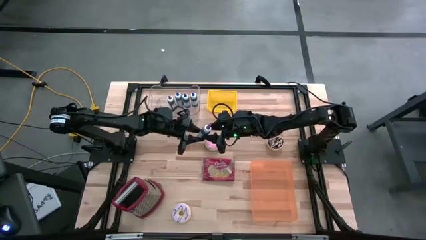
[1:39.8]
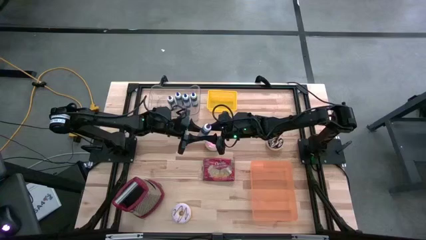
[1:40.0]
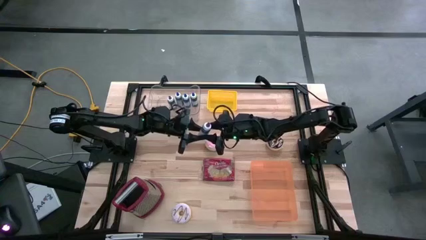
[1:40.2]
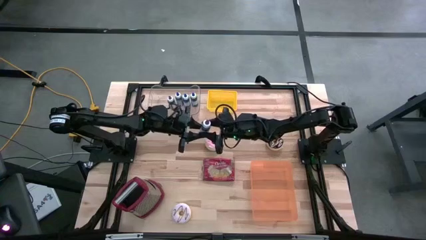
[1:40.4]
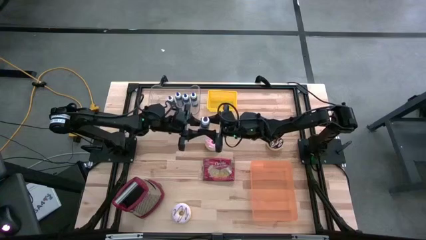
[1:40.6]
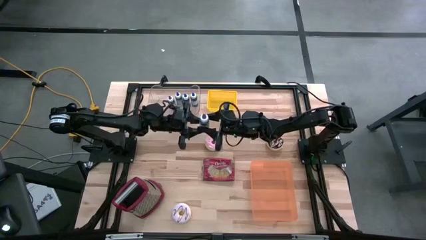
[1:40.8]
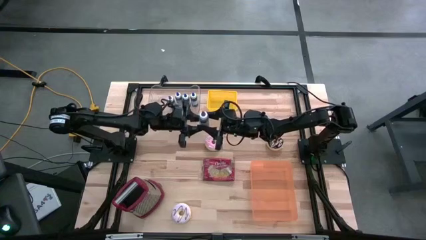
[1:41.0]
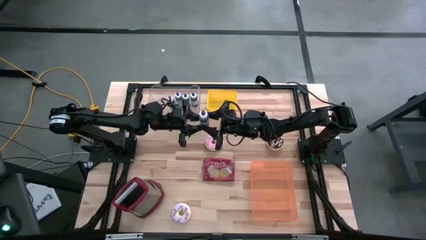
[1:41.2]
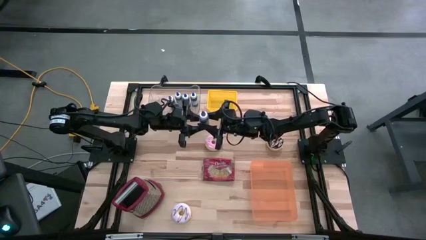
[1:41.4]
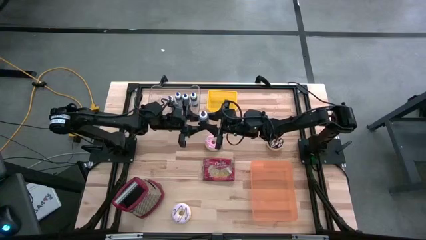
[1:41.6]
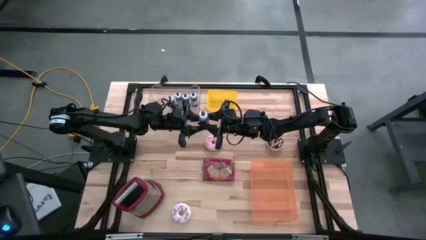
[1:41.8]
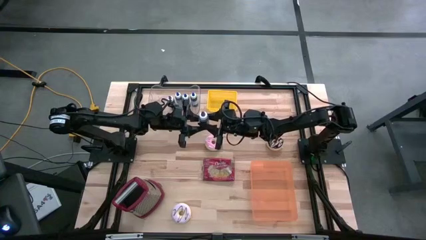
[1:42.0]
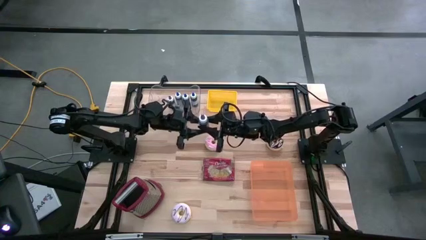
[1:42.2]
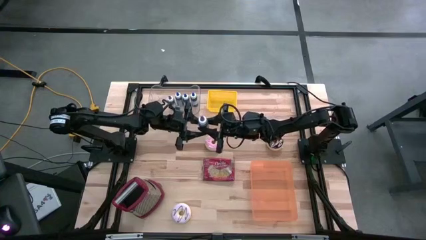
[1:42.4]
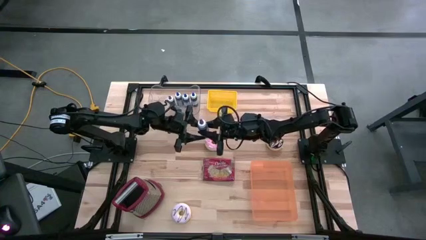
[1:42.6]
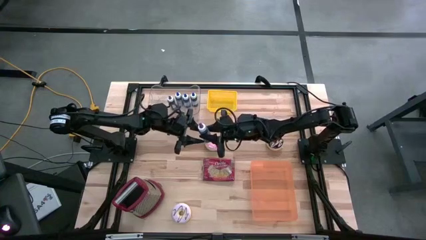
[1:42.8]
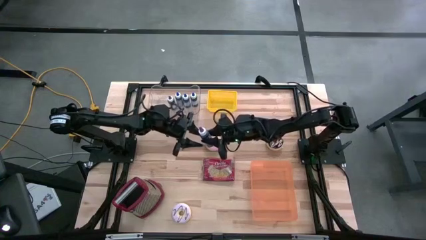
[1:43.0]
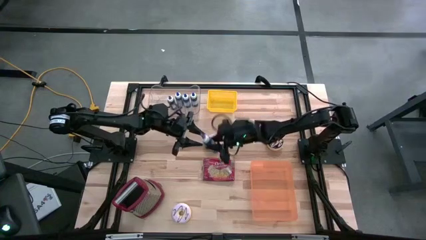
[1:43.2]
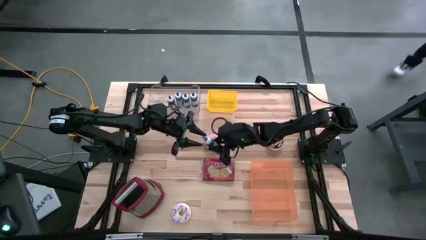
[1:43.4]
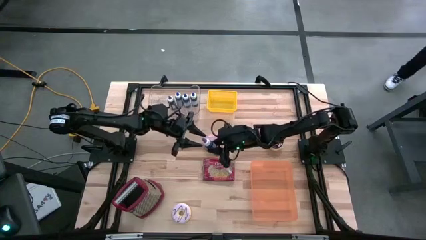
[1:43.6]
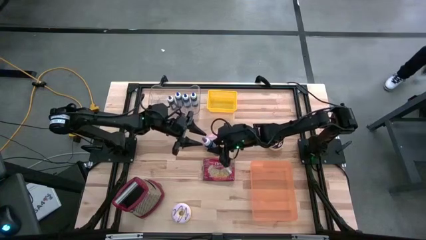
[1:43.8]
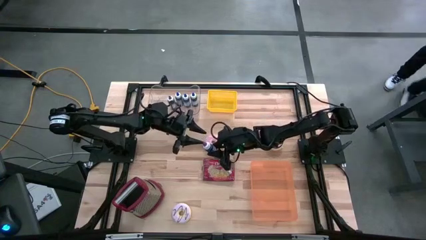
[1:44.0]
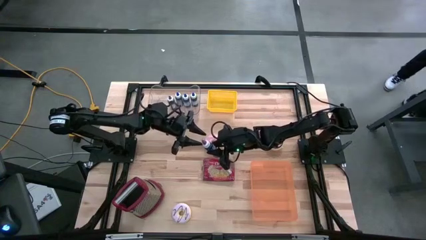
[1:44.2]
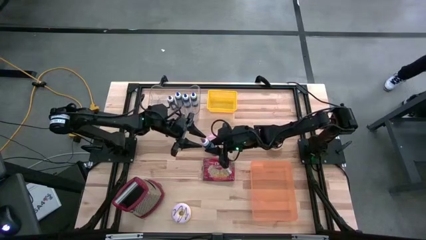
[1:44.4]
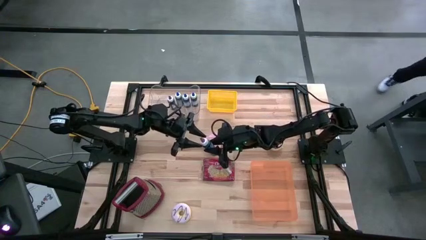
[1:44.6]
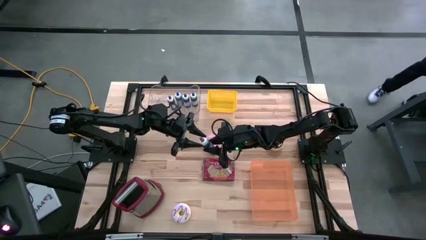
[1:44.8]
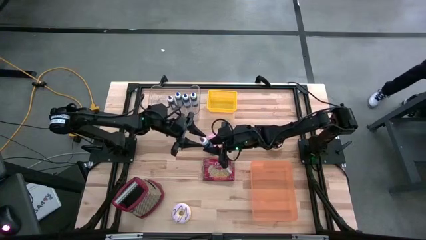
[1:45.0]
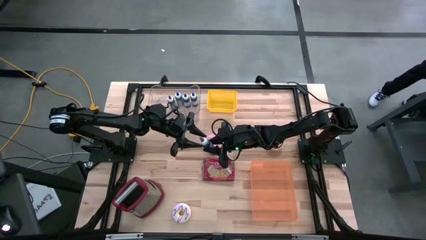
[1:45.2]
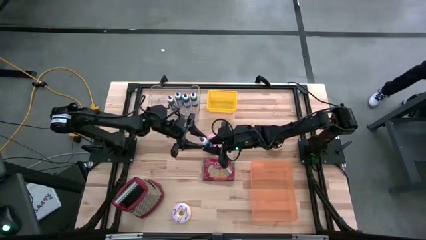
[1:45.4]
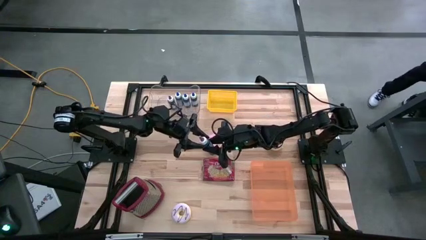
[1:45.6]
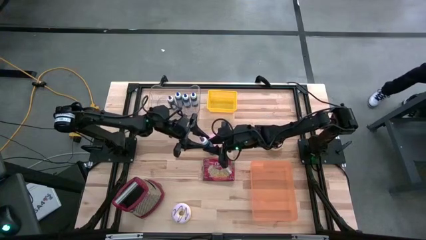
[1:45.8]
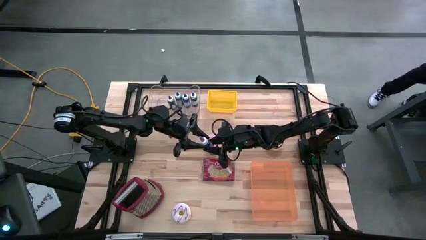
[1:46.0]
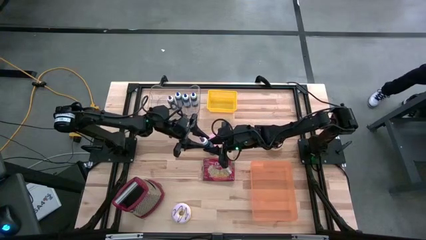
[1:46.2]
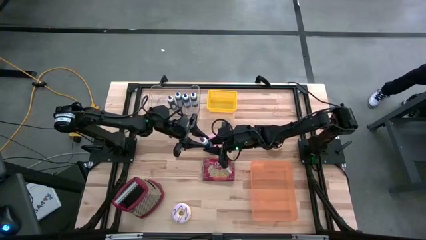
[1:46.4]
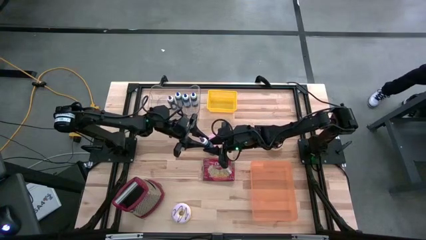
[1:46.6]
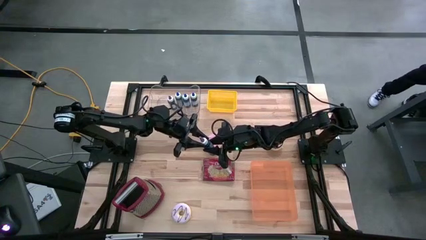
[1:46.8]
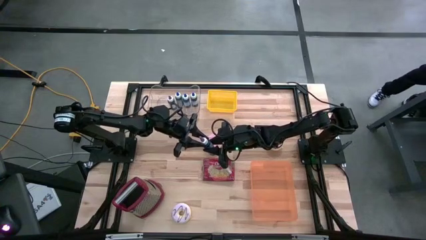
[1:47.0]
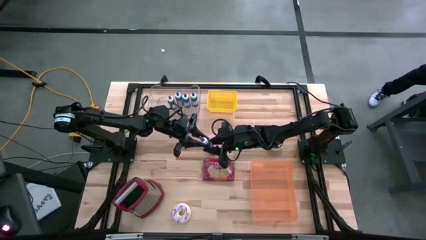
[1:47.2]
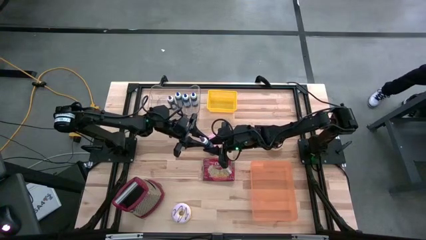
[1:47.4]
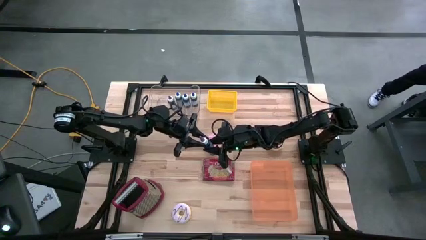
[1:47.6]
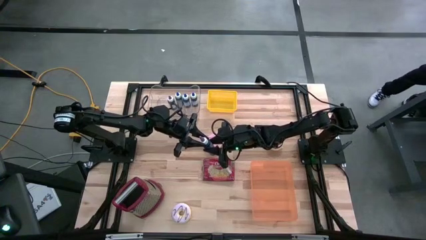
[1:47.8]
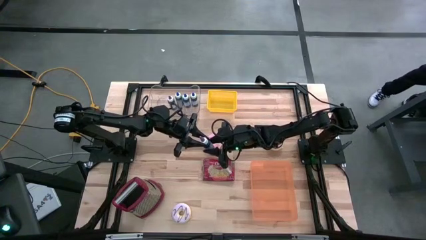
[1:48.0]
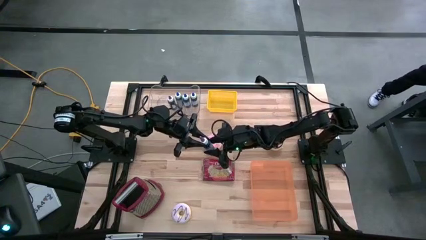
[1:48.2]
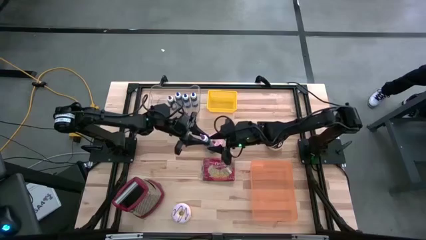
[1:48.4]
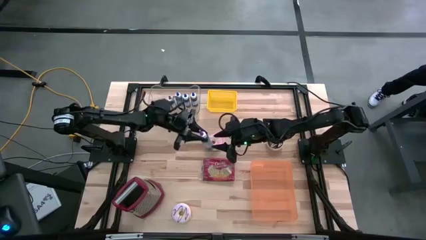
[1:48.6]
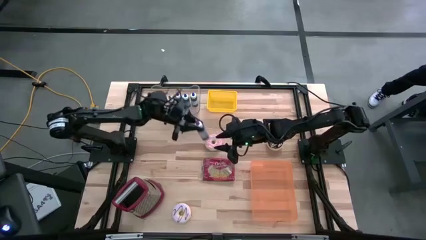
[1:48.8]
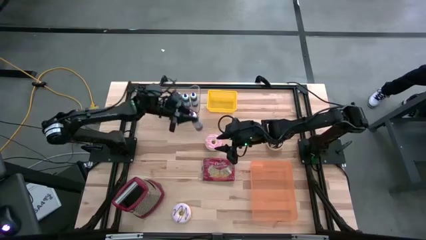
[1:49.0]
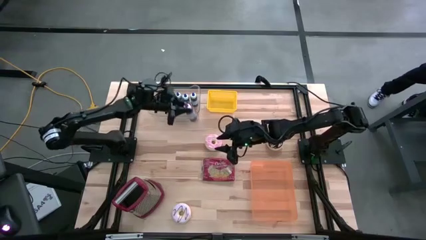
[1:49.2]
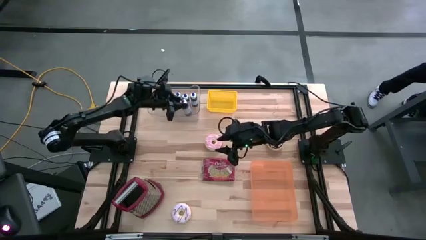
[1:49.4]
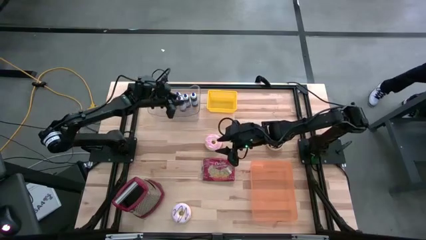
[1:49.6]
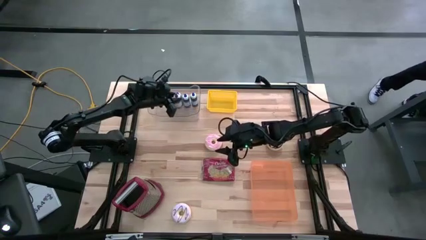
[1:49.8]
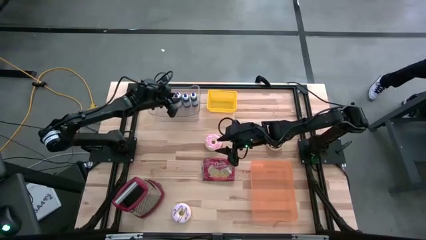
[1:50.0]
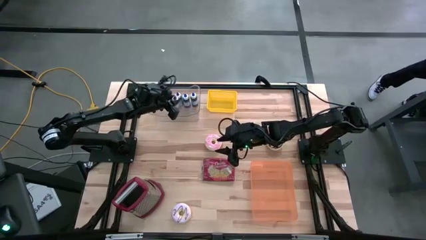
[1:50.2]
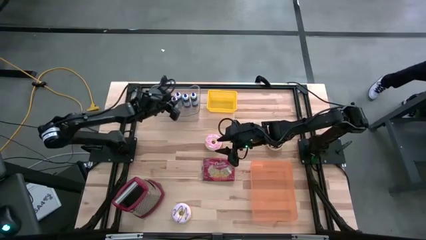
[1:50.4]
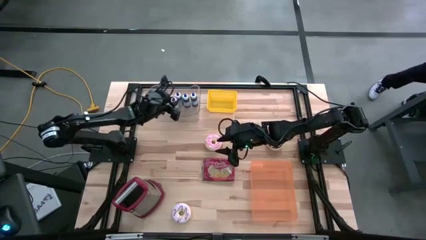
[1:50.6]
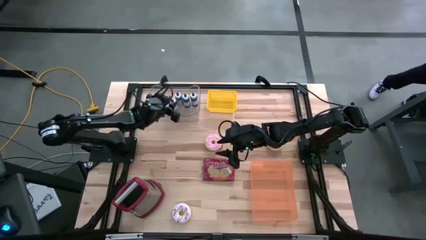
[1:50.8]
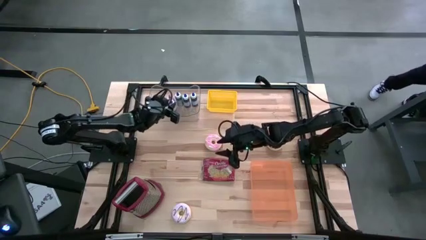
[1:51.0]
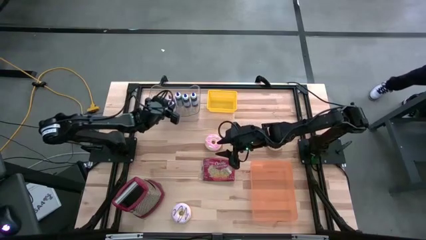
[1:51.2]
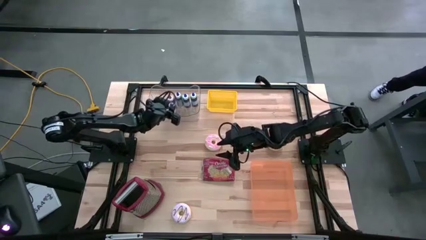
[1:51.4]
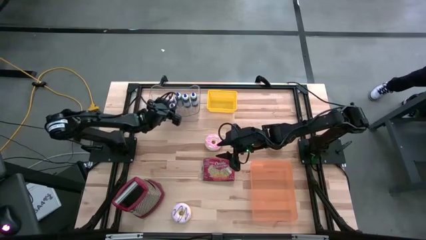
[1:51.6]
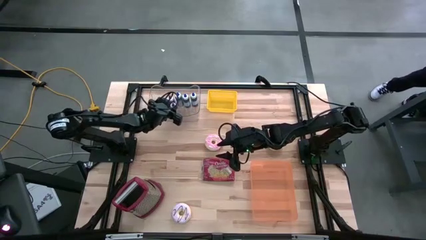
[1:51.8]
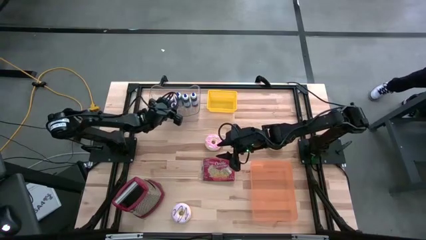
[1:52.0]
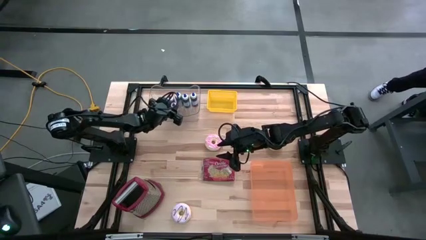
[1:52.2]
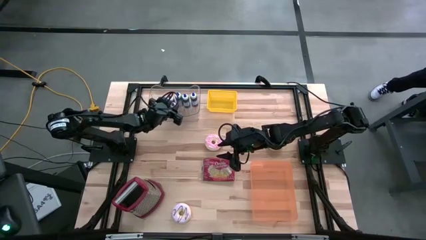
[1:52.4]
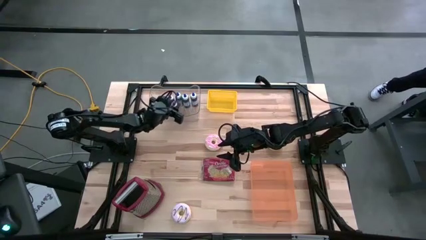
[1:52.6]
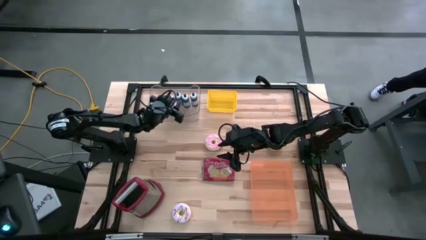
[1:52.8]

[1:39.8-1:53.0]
Put the violet food coloring bottle into the transparent bin

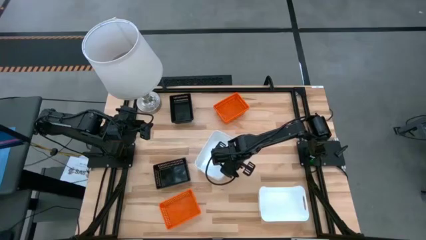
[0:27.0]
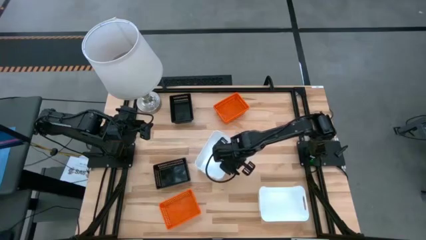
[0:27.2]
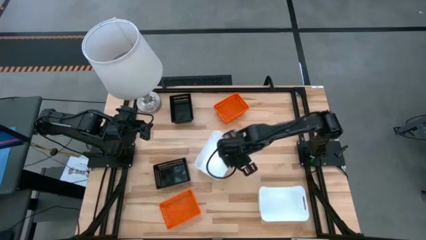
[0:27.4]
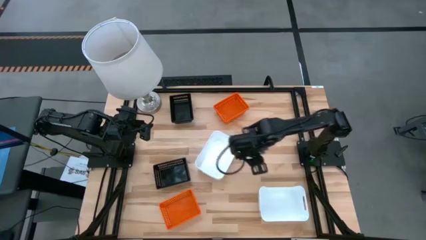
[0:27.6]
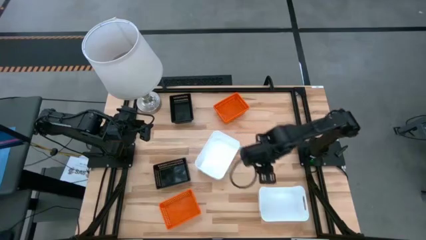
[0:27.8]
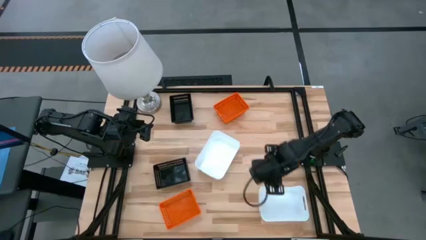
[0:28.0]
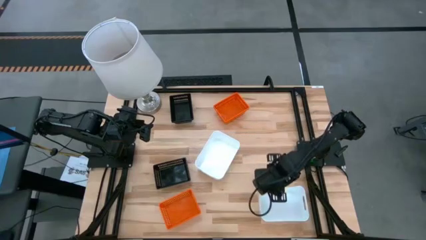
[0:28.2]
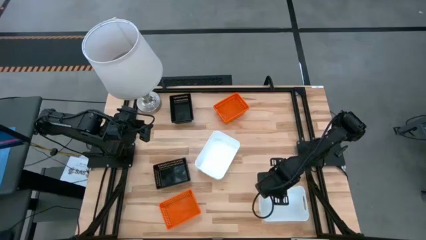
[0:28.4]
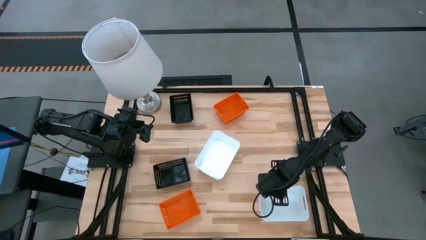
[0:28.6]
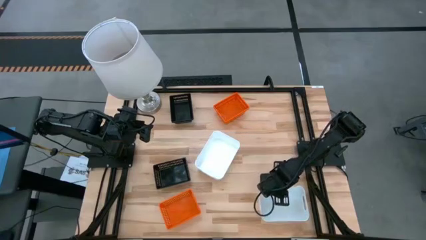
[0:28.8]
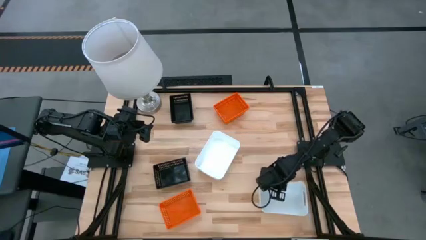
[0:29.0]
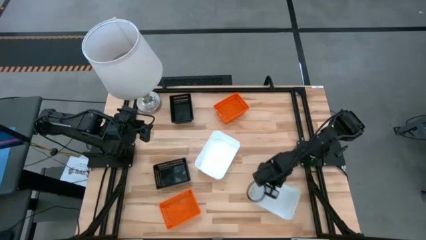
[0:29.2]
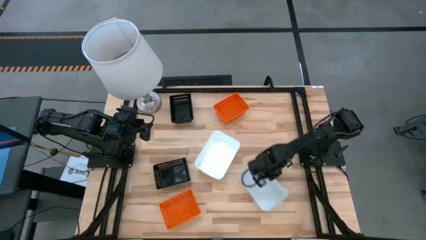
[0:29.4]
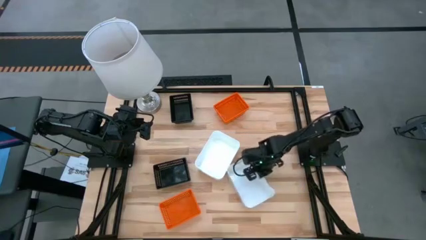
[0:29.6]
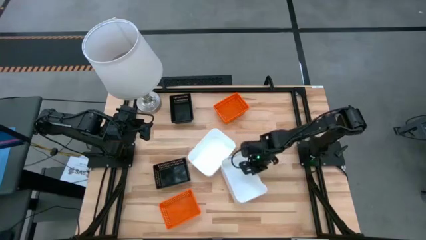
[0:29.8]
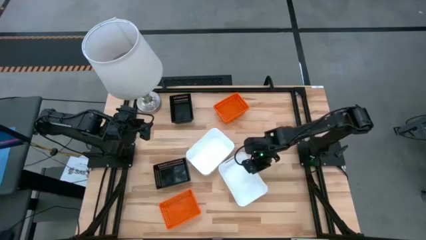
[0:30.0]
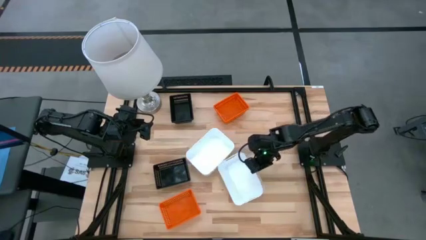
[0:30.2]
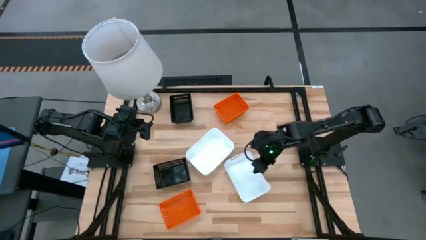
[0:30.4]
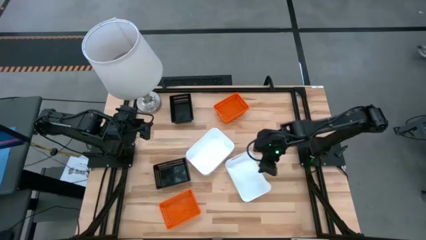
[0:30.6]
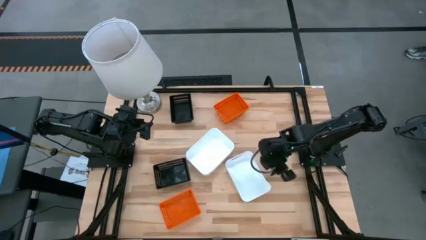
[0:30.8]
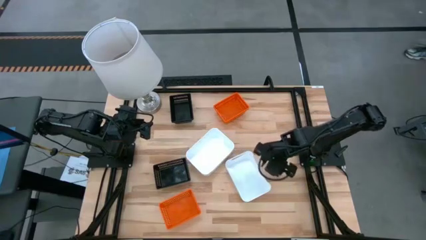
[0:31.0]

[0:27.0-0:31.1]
Stack the white bin on top of the stacked white bin
